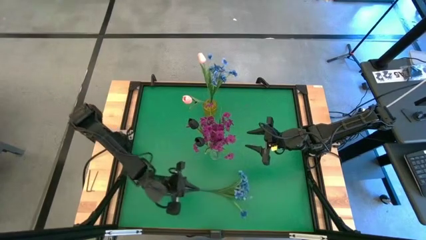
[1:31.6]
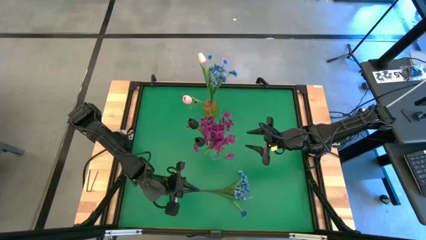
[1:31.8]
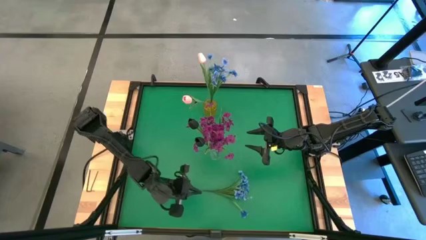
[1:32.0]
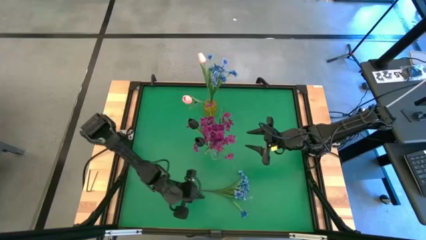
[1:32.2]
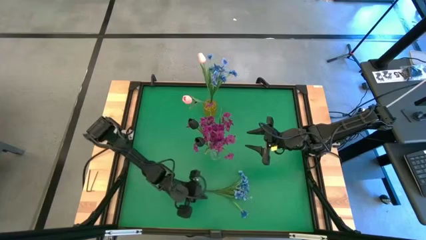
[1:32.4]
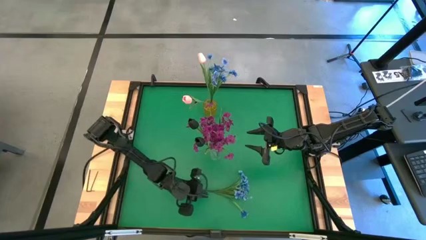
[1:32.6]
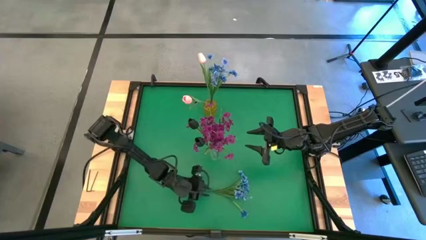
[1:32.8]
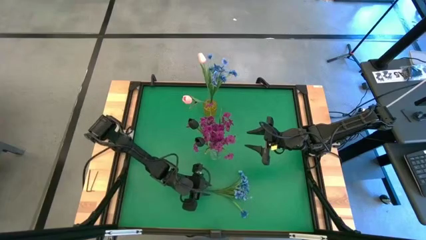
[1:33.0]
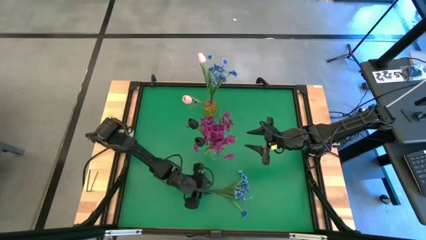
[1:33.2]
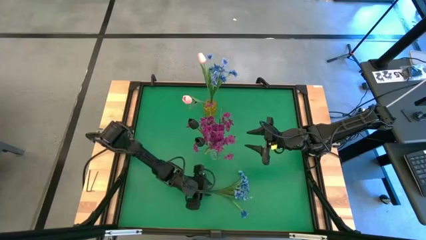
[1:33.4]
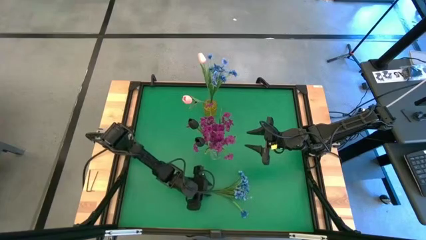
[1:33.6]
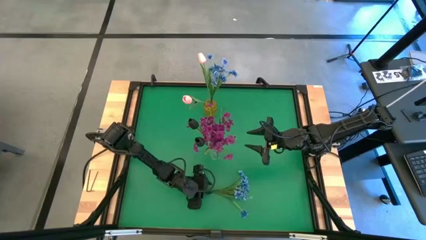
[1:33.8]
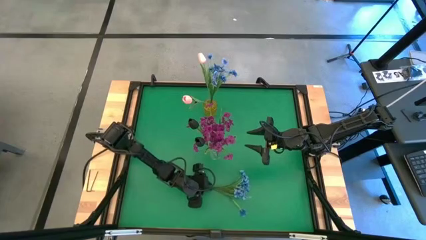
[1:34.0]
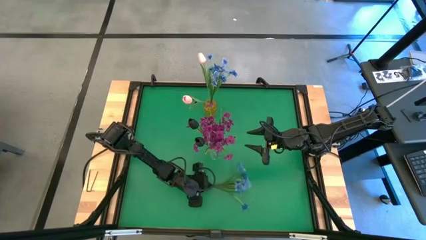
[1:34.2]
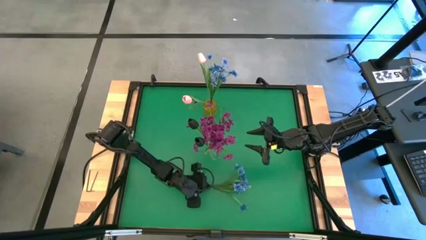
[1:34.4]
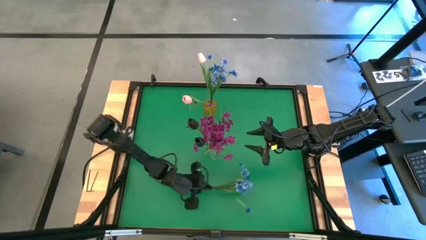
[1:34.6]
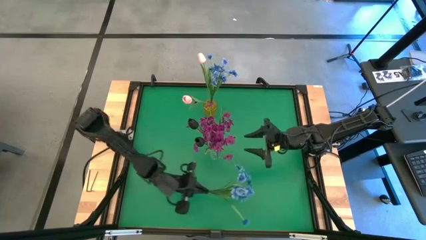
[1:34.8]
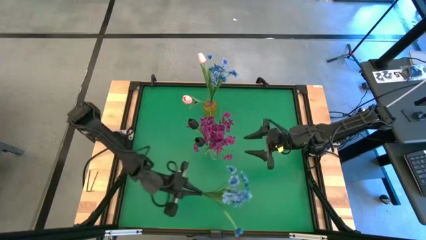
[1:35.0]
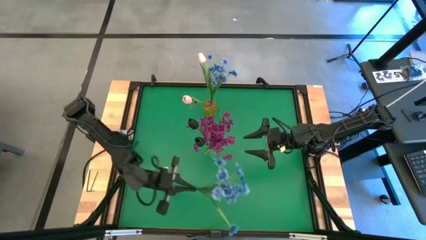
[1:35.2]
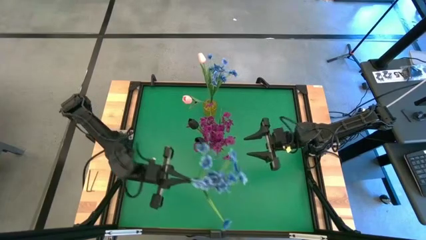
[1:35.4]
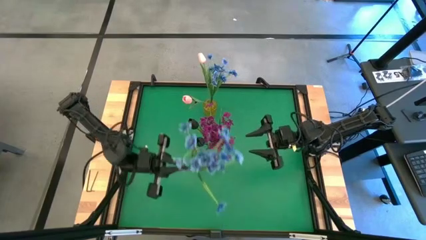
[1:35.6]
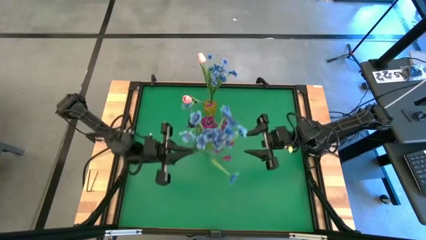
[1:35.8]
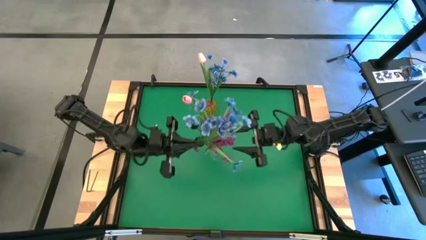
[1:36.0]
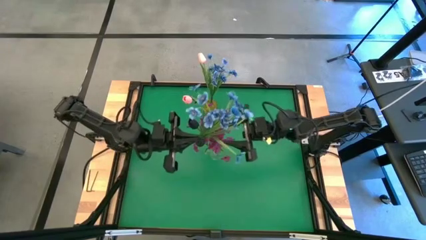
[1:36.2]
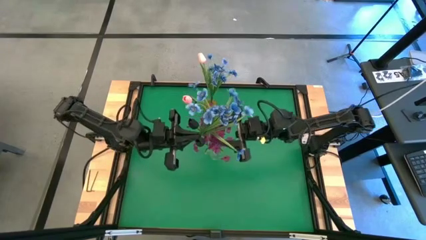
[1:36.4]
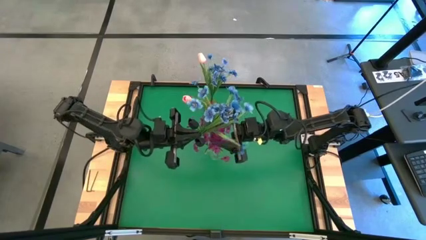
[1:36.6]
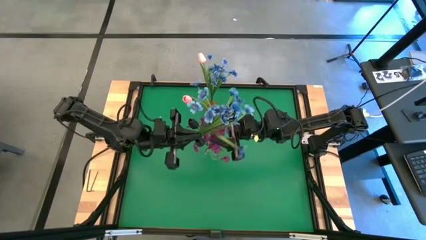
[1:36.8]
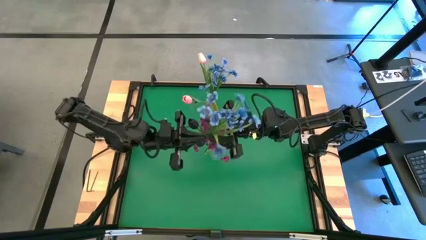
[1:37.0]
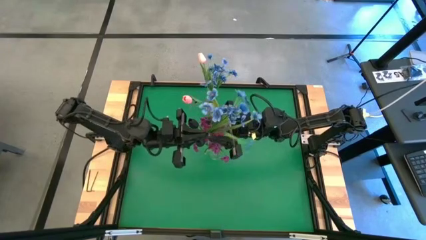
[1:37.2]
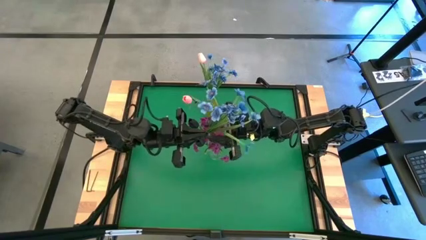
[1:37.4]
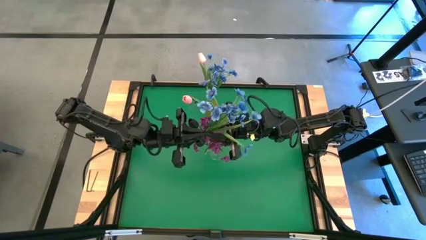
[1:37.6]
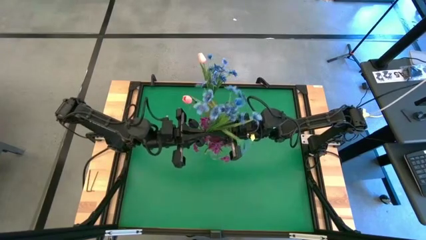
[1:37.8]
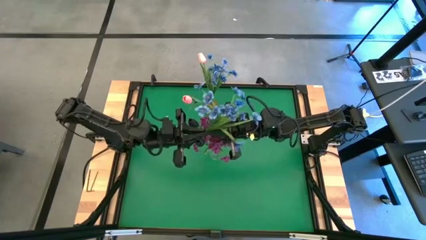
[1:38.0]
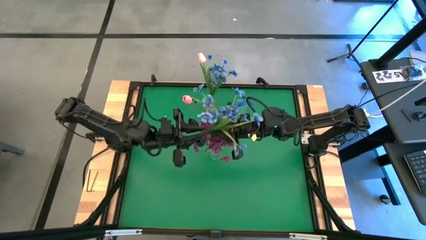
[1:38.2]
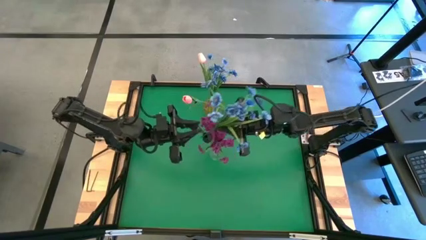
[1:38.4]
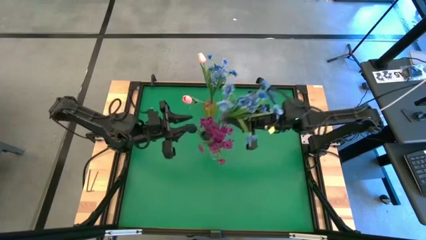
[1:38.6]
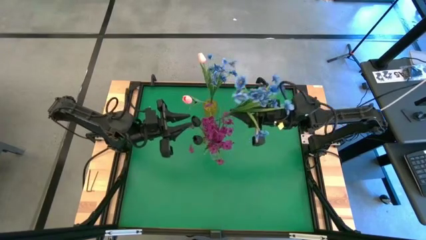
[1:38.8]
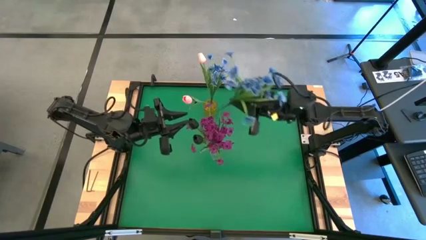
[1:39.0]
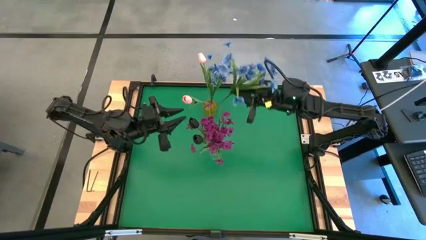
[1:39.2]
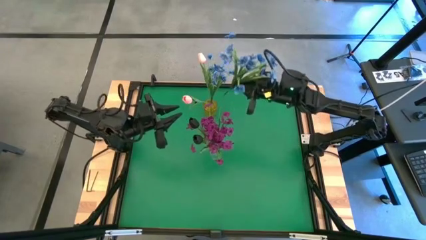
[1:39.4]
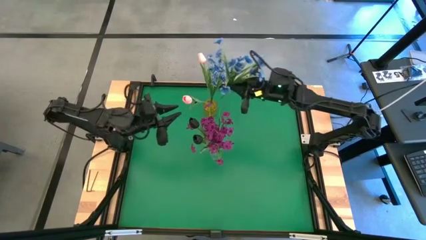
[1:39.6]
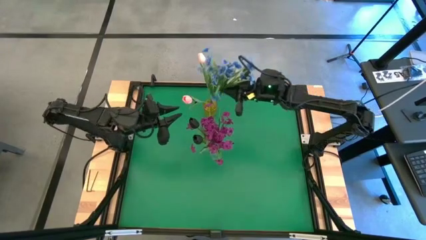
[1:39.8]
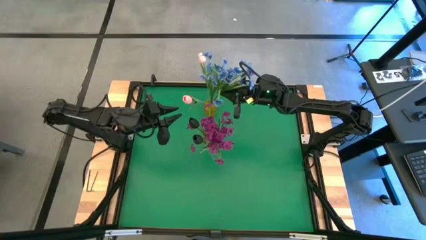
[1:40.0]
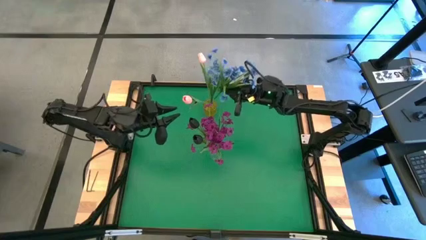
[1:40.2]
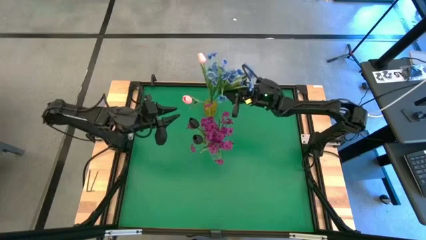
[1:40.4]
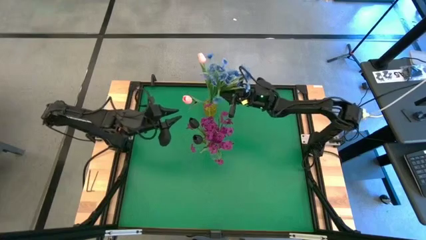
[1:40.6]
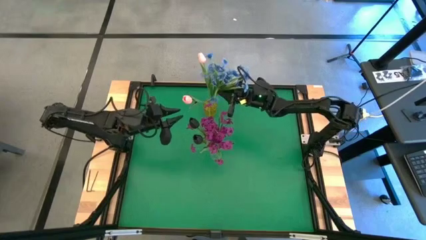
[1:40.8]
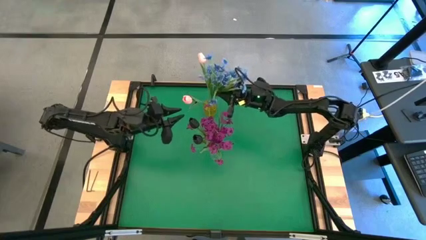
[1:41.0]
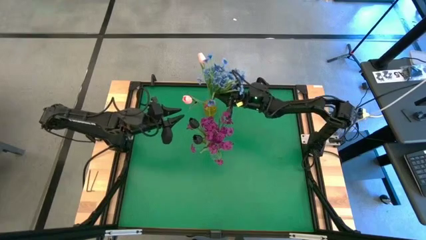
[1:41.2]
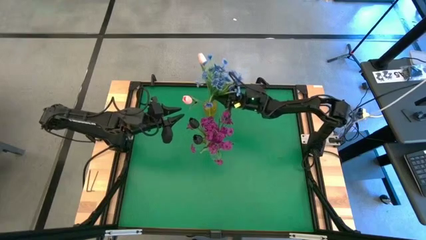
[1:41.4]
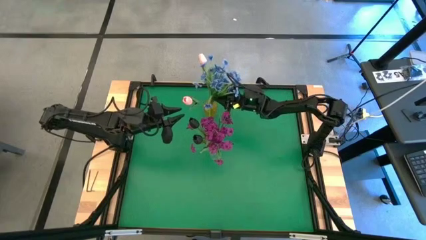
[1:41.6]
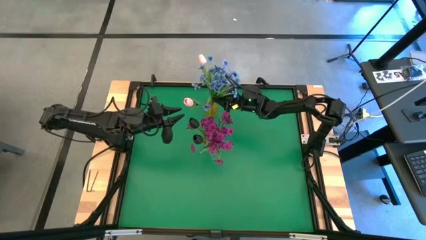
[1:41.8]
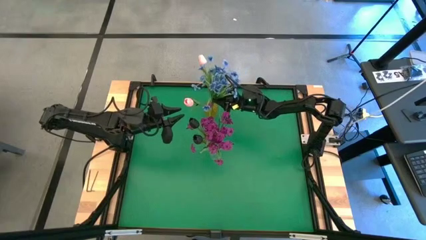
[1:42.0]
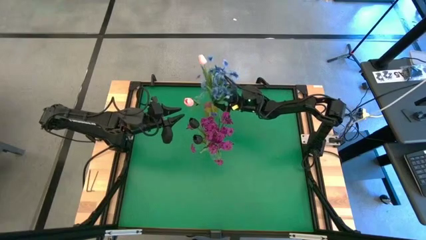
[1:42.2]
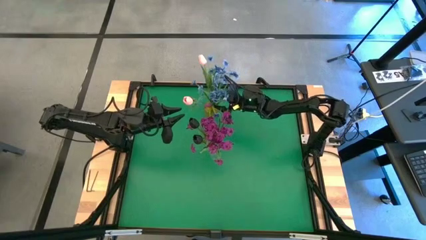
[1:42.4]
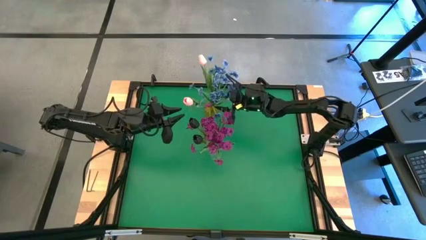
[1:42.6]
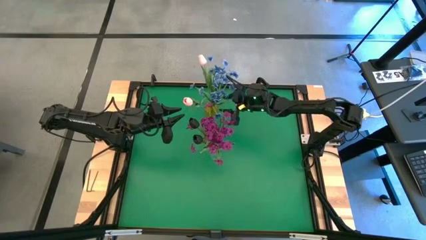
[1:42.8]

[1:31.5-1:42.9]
Task: Sort flowers into vase by color
Put the blue flowers into the yellow vase

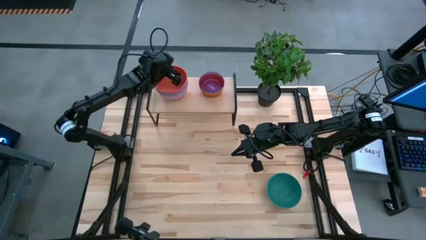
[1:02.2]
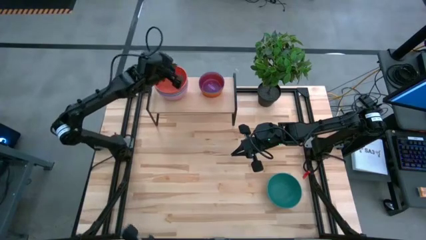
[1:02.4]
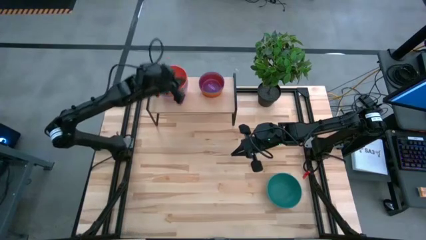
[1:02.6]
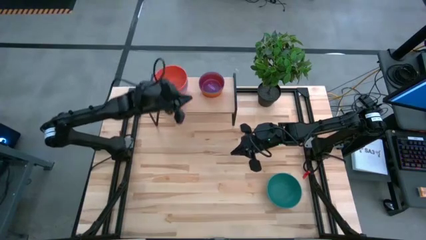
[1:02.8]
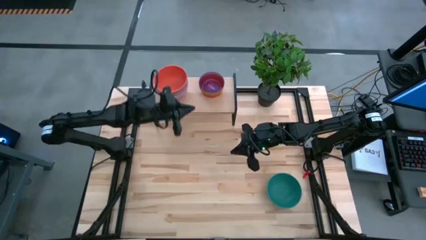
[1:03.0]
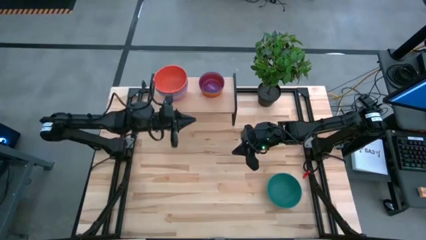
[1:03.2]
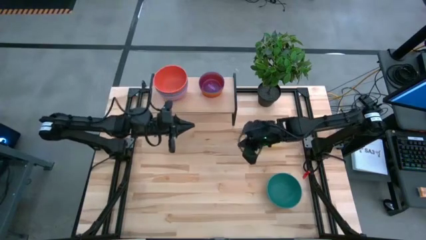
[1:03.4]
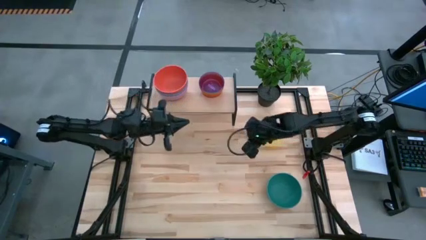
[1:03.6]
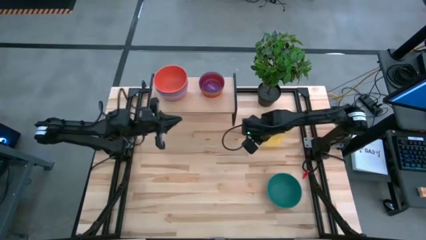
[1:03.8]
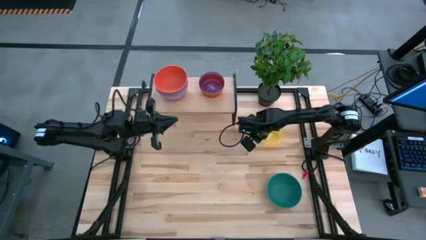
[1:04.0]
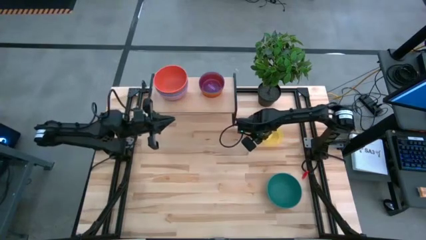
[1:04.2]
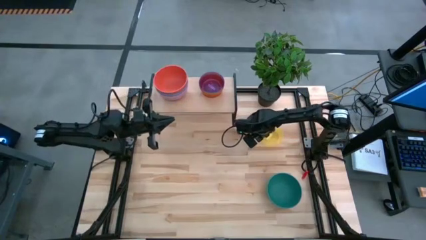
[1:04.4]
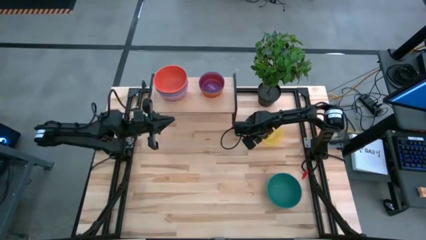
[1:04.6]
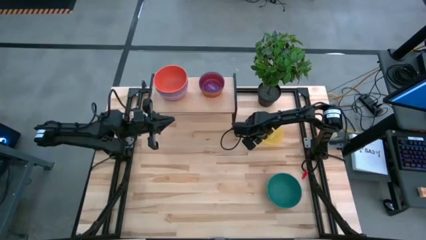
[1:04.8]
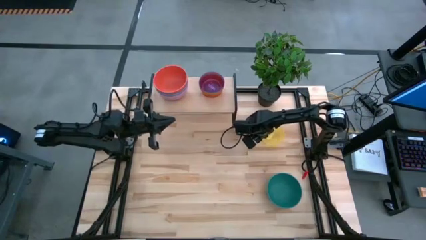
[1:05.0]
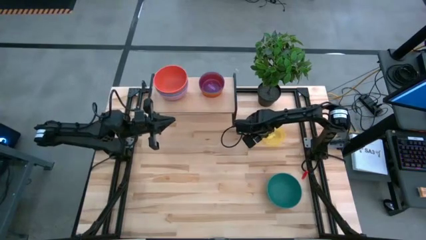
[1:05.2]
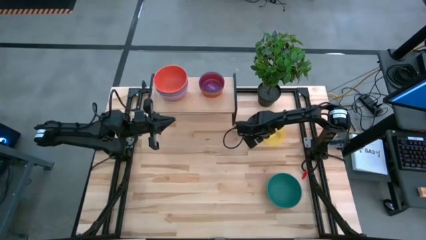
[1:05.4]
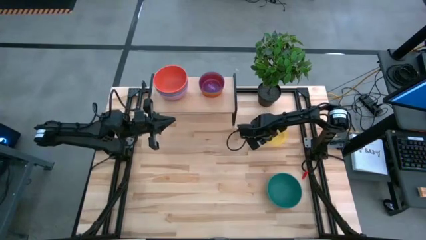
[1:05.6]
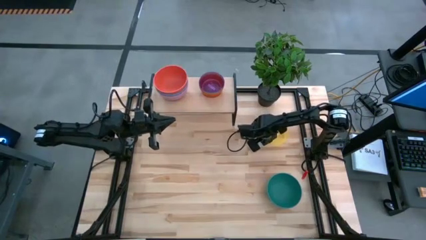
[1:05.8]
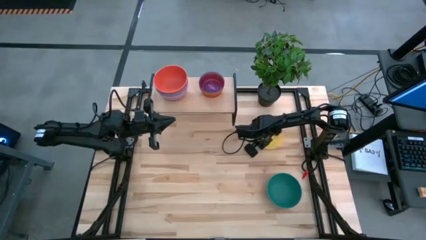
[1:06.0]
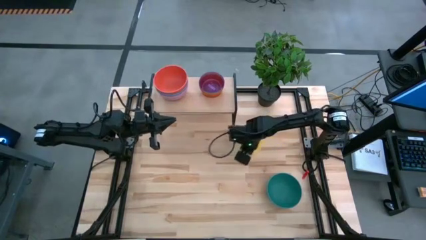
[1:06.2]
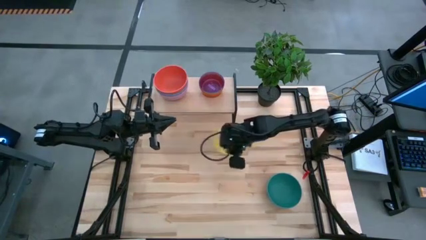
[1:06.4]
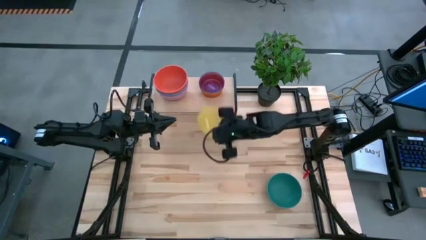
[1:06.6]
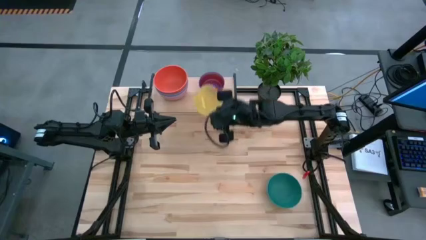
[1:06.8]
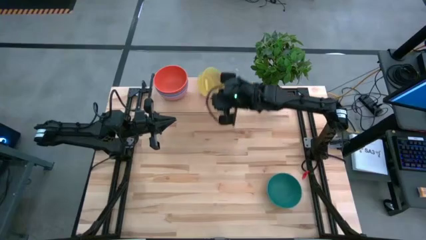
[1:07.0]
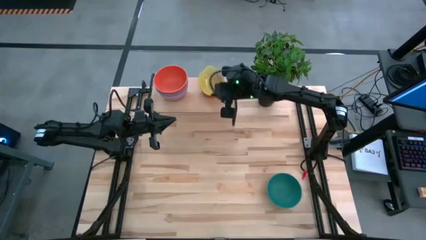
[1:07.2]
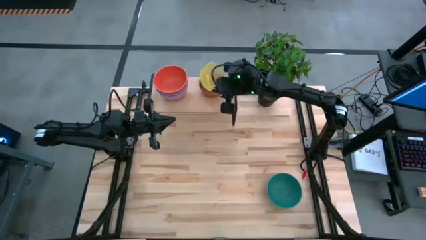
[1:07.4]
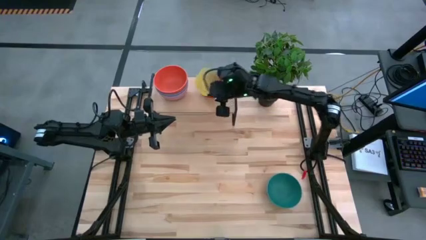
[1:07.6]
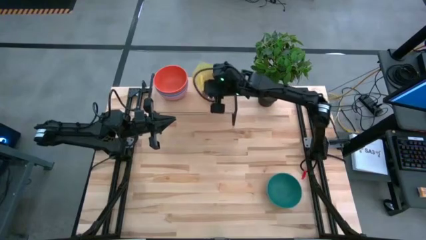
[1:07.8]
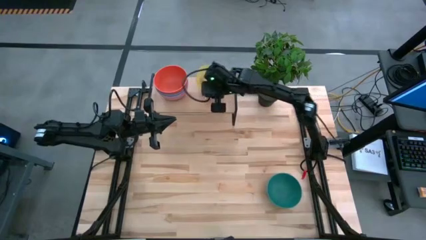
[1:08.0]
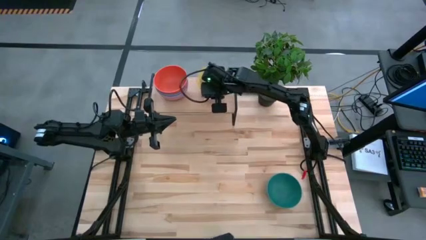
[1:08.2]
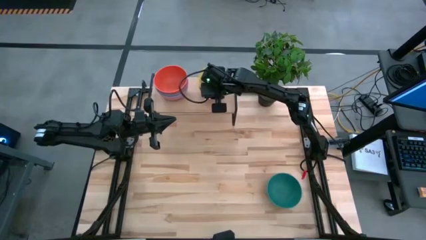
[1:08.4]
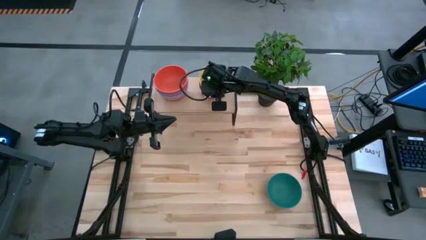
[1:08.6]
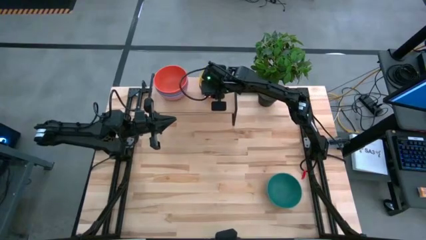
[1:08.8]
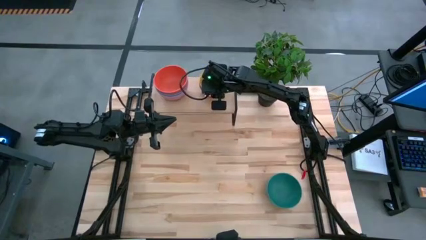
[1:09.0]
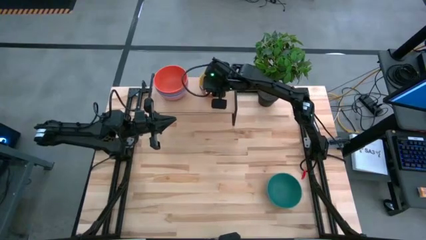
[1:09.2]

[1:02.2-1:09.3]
Task: Place and stack bowls onto a shelf
Stack the small yellow bowl on top of the small purple bowl on the shelf
